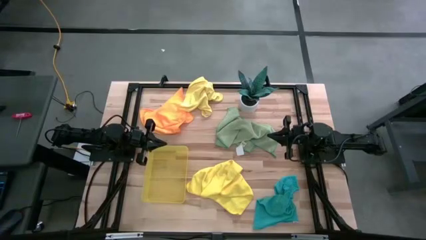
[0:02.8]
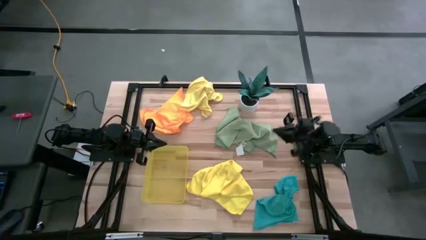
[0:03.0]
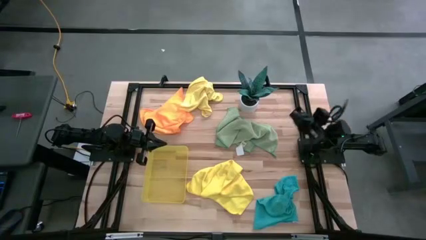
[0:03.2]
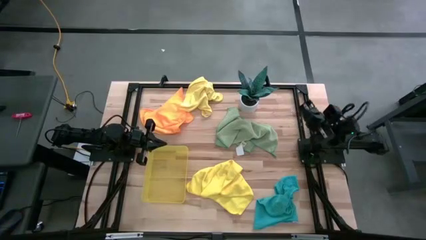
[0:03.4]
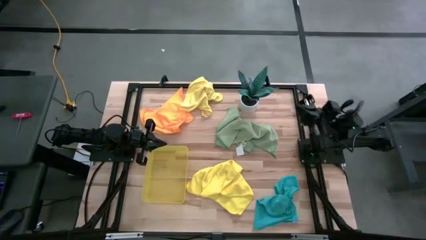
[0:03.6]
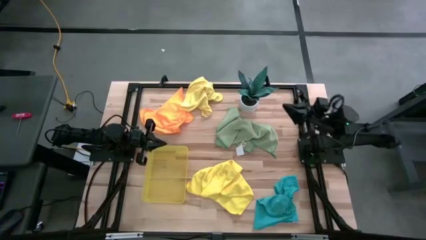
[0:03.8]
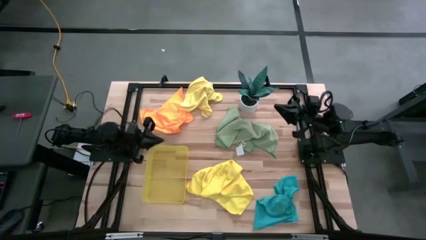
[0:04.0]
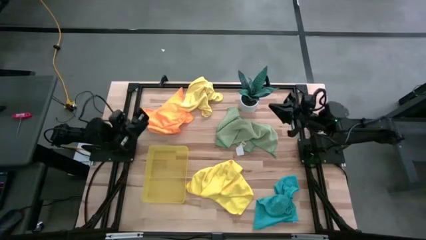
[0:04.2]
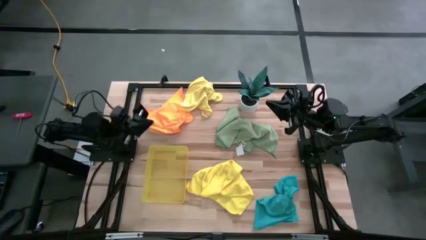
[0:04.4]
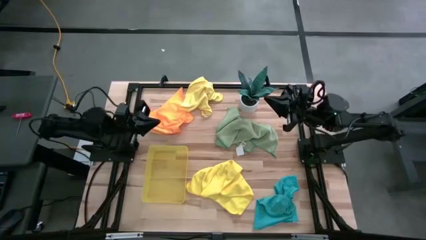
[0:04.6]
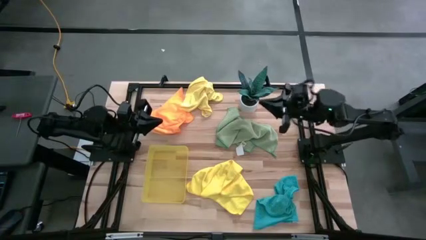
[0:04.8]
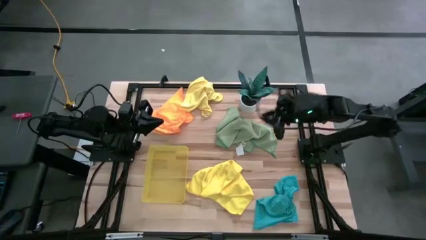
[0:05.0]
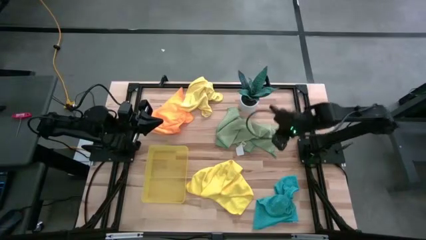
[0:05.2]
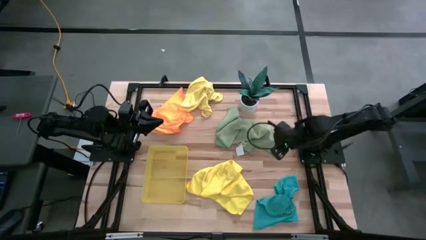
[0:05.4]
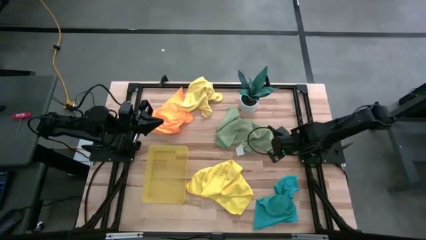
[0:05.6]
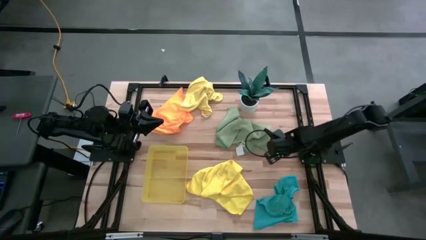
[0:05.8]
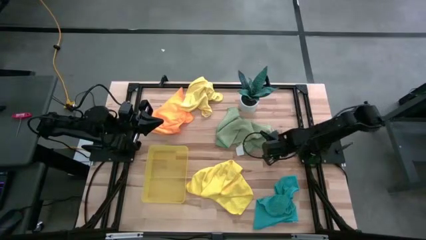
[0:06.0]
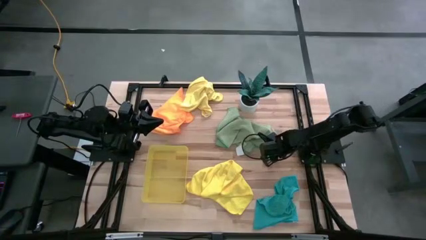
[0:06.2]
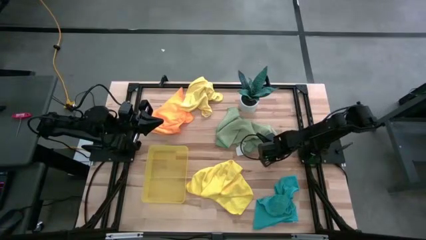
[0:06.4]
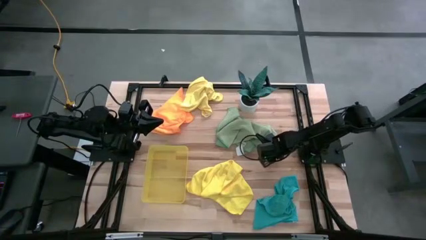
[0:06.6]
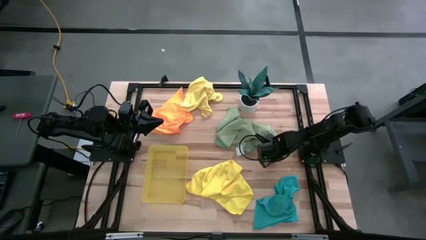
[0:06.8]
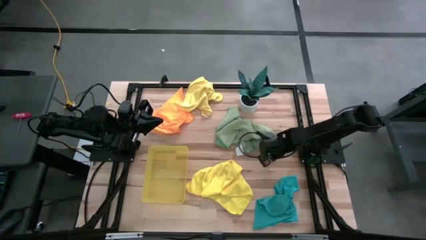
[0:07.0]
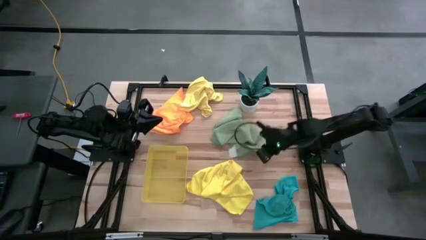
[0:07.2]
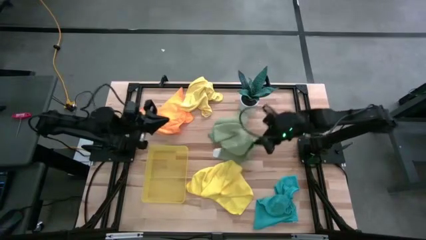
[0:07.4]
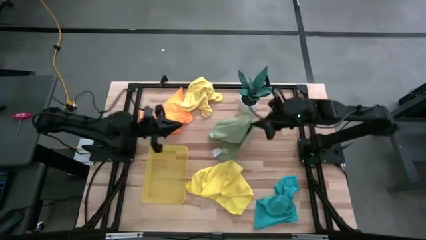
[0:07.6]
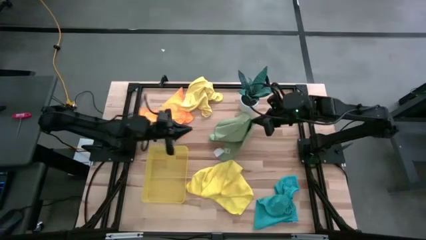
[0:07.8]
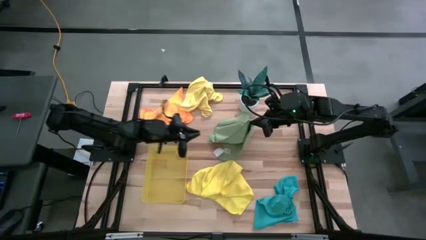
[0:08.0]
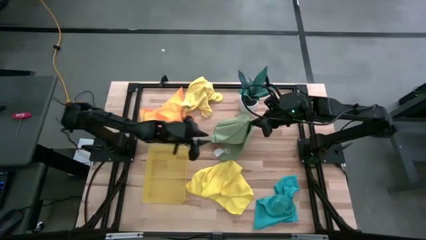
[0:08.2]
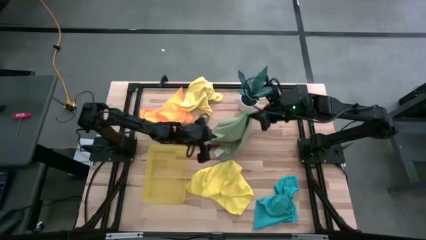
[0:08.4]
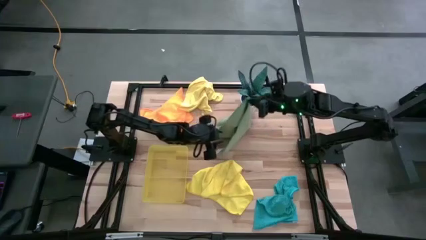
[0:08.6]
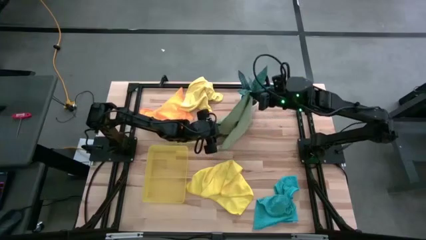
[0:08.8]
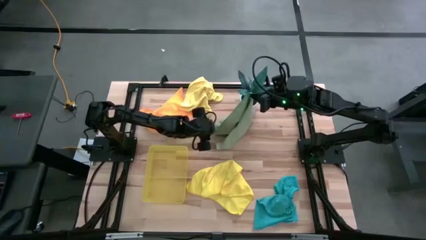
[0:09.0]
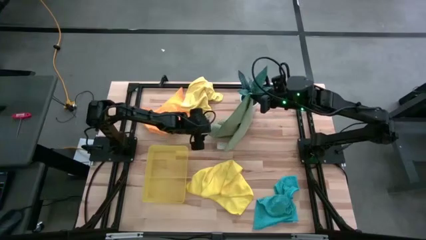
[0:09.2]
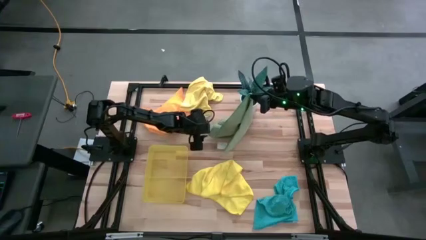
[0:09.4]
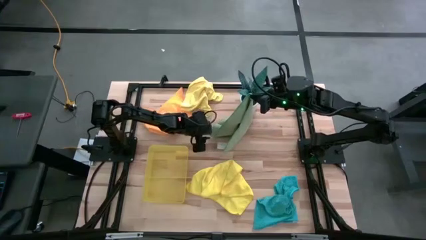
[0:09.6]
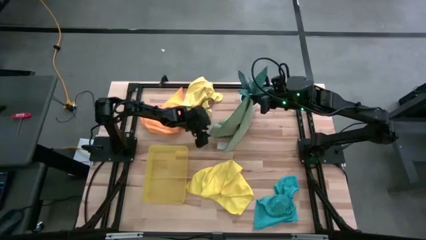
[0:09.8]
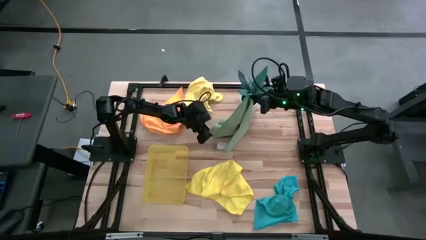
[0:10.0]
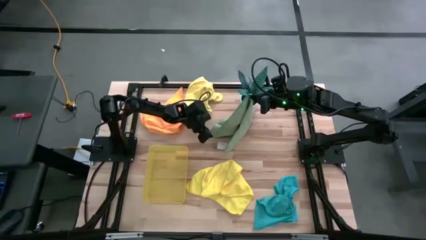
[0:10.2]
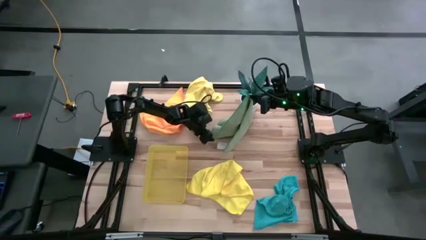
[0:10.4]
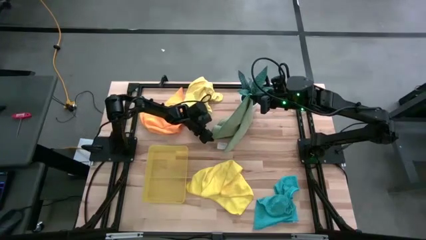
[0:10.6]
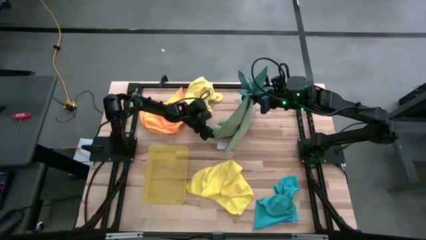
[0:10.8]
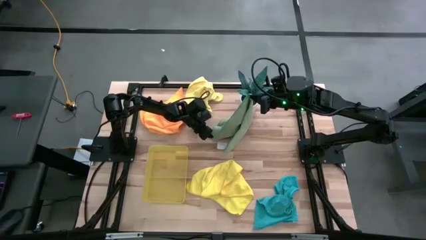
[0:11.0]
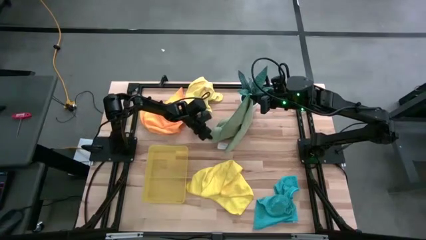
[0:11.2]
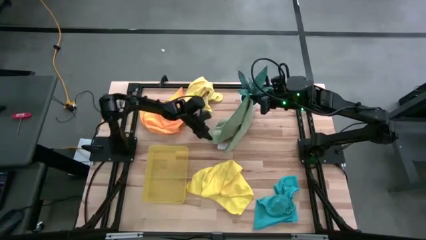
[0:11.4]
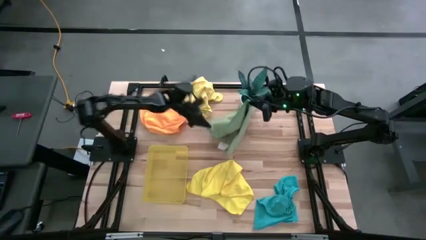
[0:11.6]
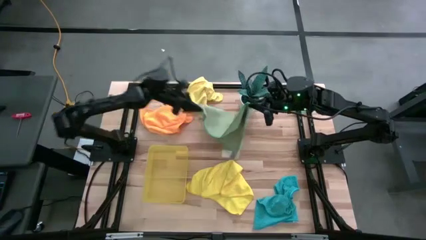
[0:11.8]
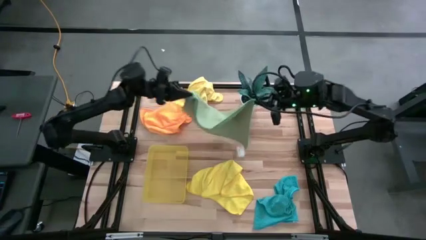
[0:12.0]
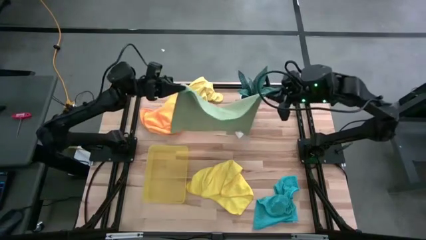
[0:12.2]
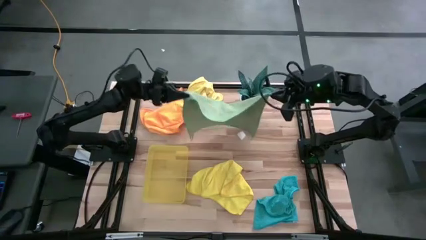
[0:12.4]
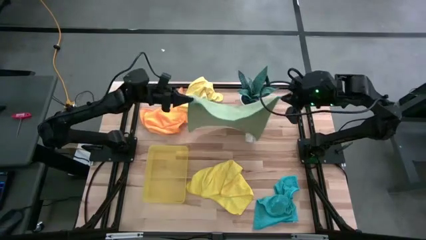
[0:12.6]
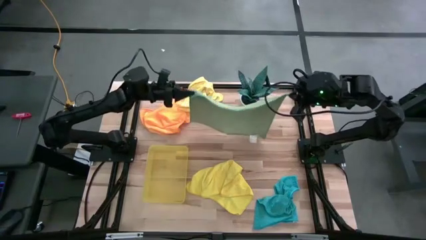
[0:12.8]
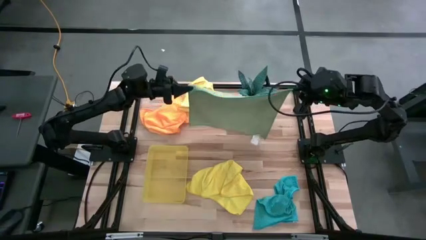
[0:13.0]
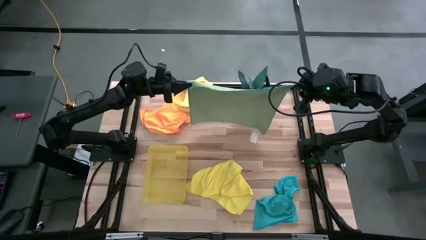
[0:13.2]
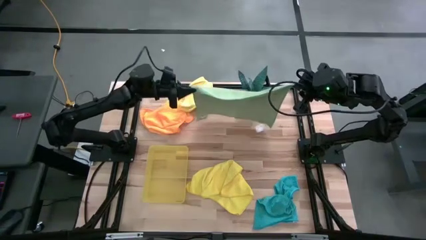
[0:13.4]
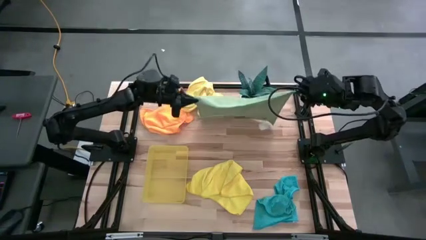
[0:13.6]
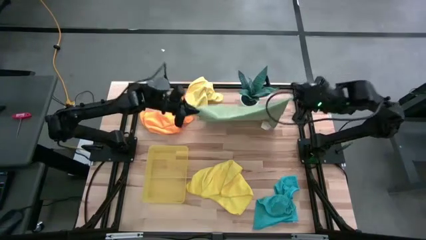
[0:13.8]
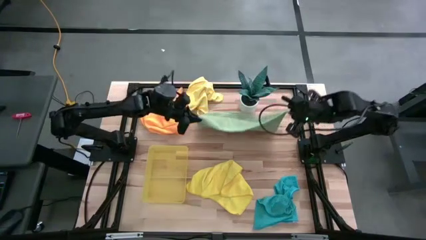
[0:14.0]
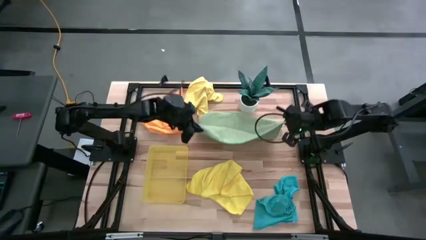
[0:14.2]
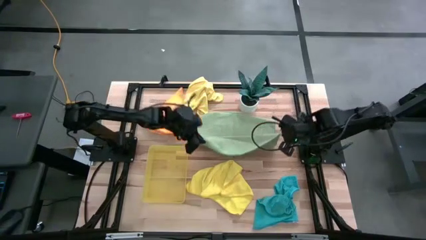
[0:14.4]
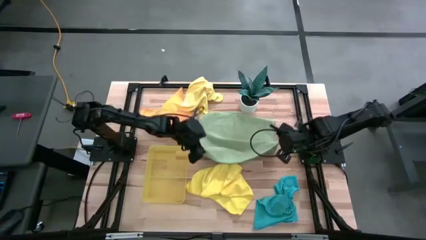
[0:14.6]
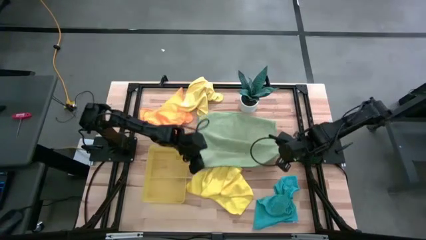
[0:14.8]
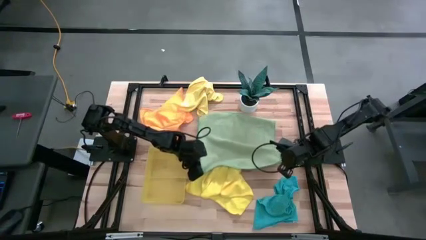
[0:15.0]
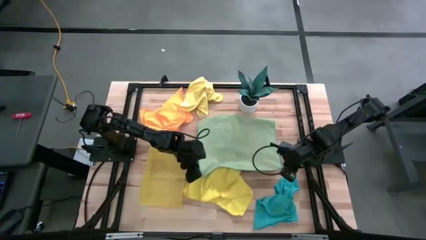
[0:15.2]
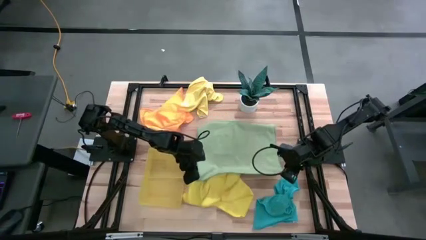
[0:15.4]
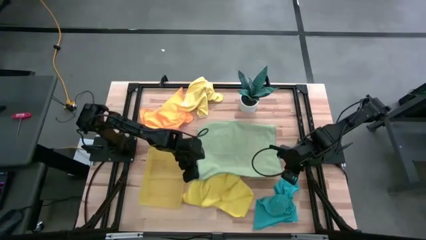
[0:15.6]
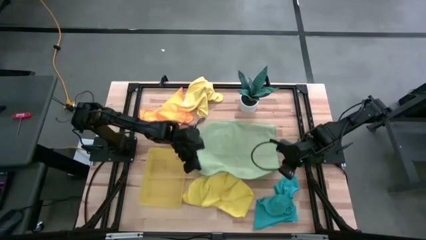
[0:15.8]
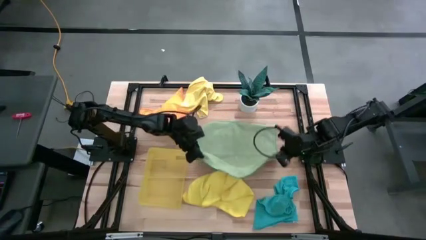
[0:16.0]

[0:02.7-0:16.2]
Task: Fold microfiber towels
Fold the green microfiber cloth
